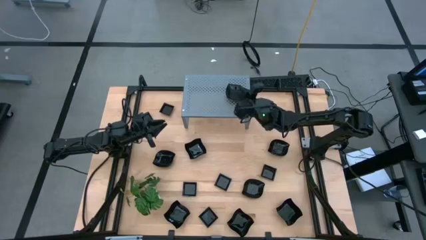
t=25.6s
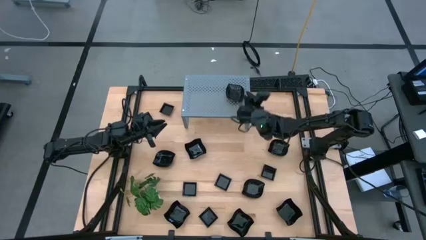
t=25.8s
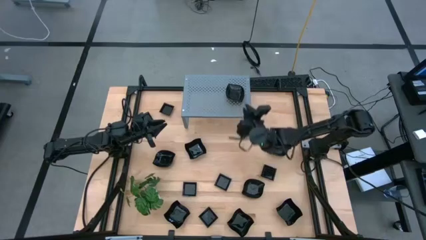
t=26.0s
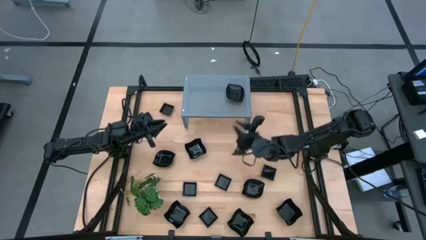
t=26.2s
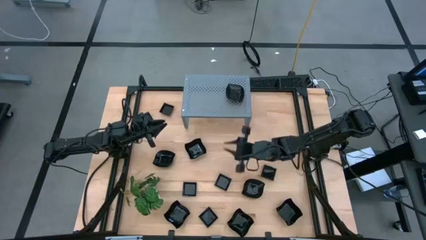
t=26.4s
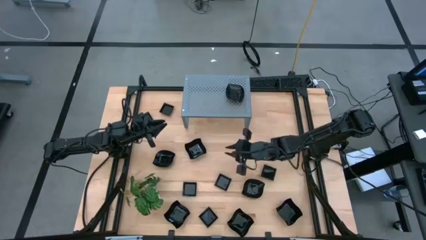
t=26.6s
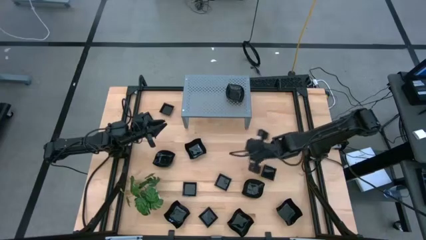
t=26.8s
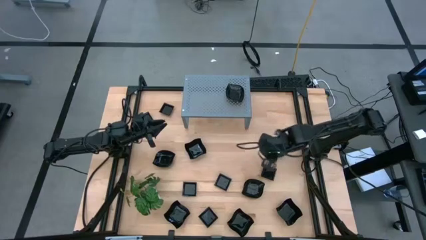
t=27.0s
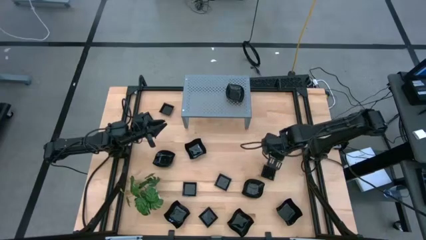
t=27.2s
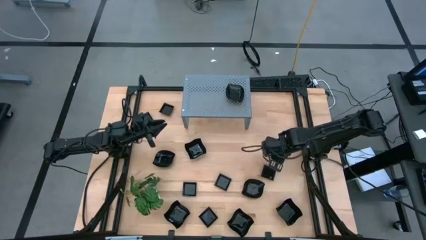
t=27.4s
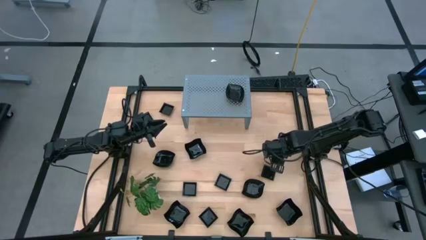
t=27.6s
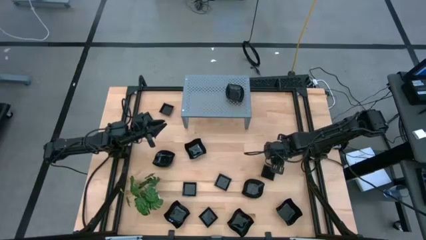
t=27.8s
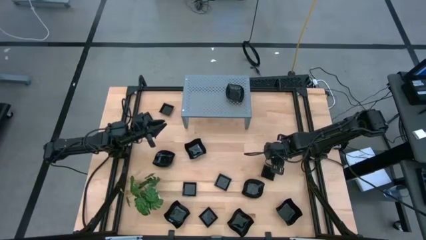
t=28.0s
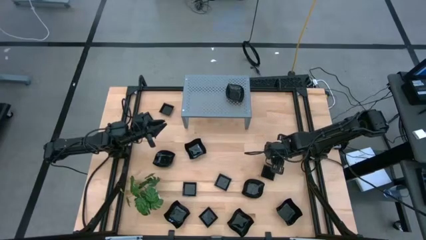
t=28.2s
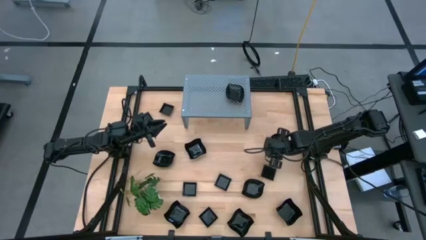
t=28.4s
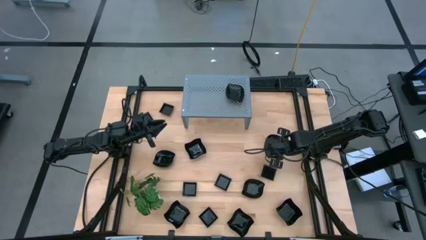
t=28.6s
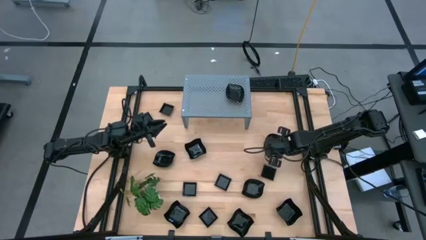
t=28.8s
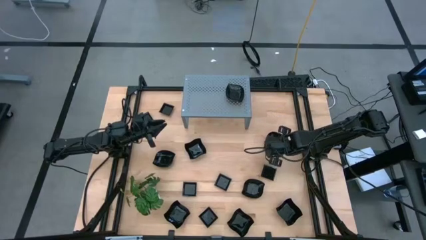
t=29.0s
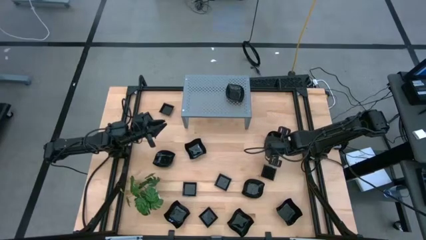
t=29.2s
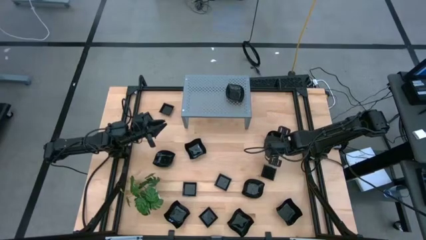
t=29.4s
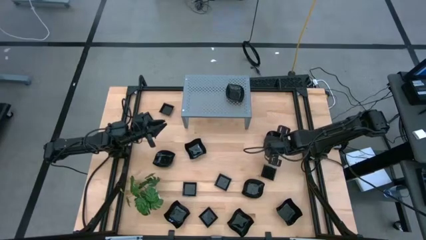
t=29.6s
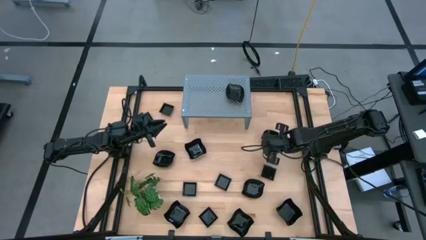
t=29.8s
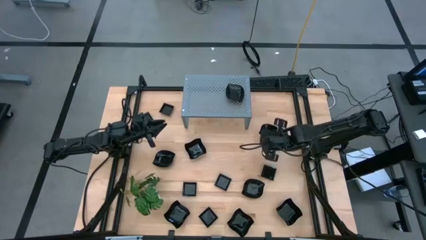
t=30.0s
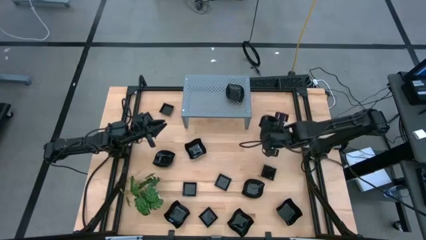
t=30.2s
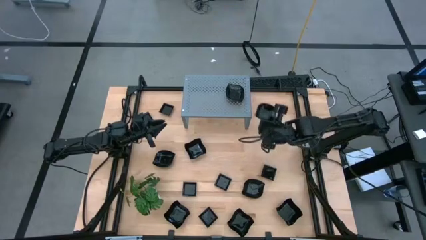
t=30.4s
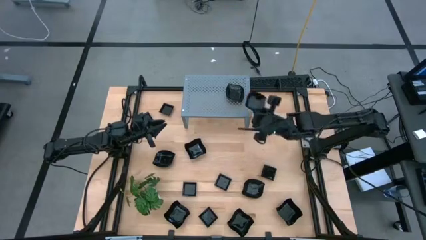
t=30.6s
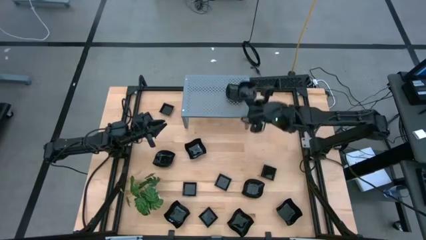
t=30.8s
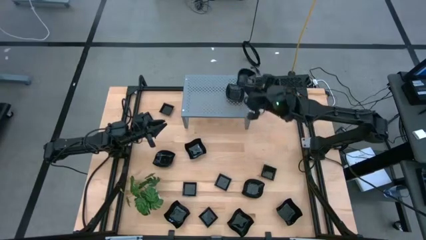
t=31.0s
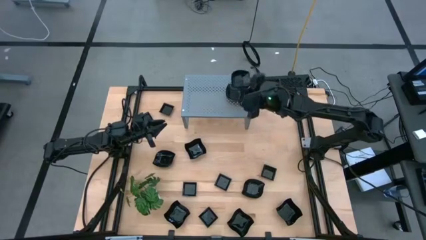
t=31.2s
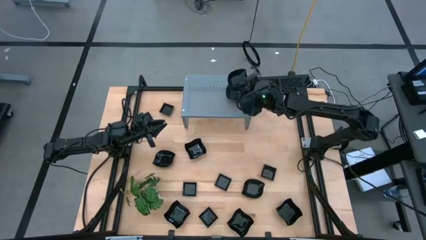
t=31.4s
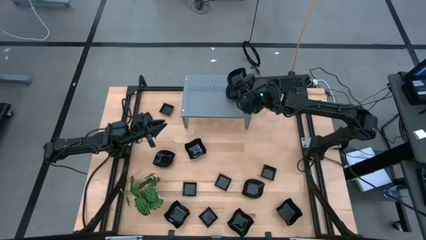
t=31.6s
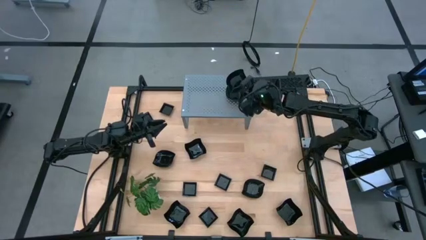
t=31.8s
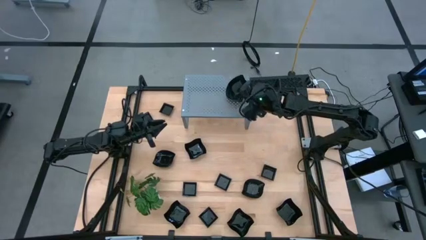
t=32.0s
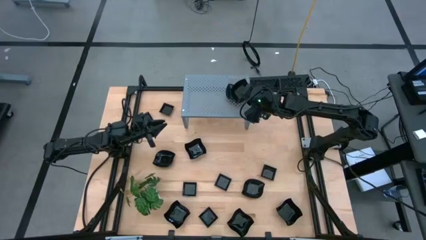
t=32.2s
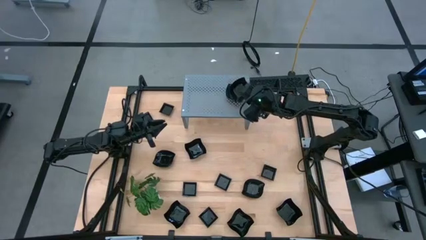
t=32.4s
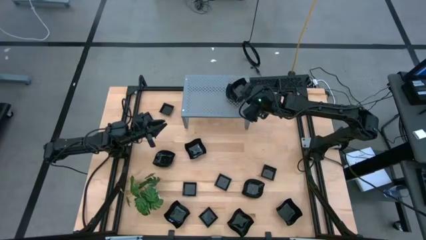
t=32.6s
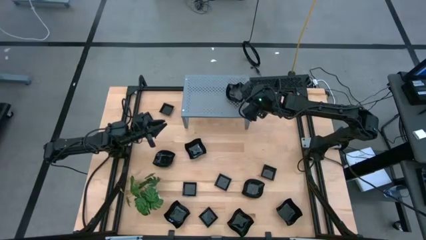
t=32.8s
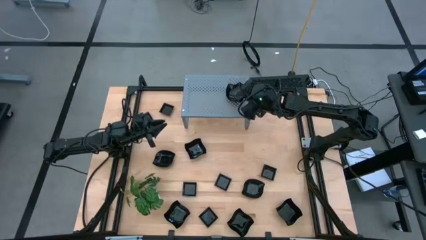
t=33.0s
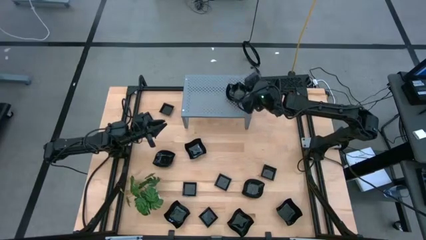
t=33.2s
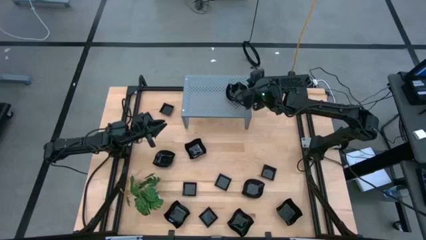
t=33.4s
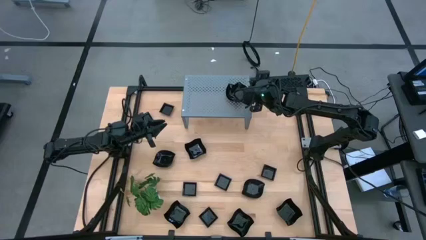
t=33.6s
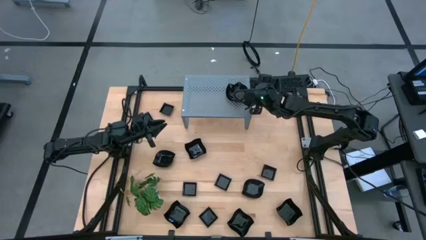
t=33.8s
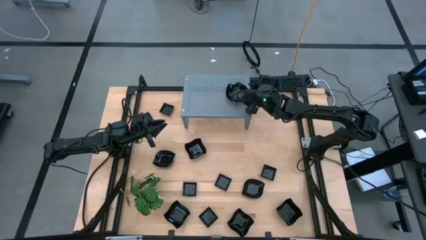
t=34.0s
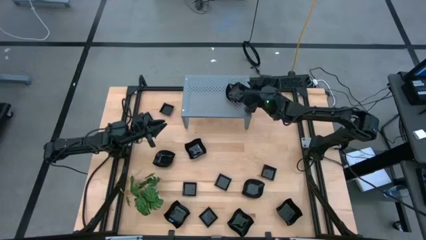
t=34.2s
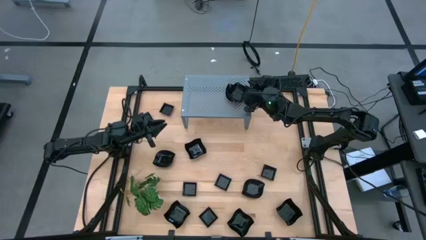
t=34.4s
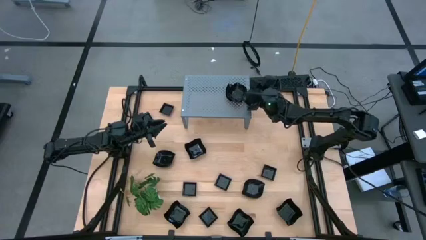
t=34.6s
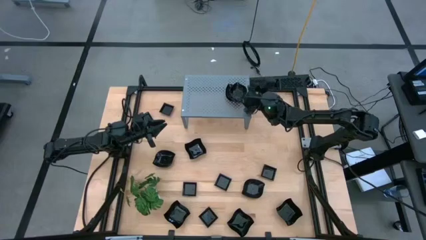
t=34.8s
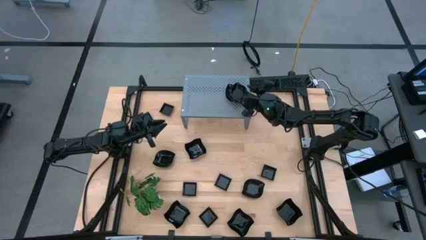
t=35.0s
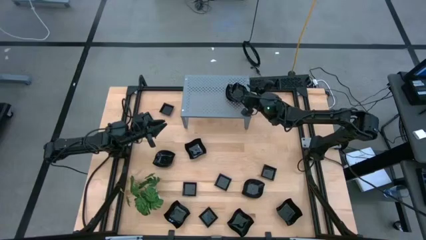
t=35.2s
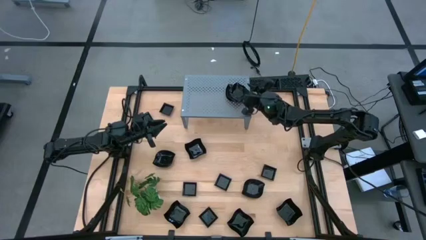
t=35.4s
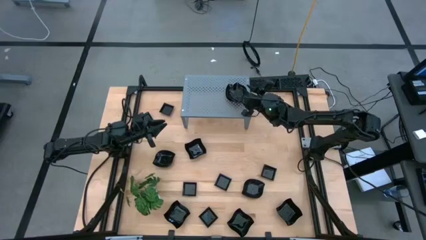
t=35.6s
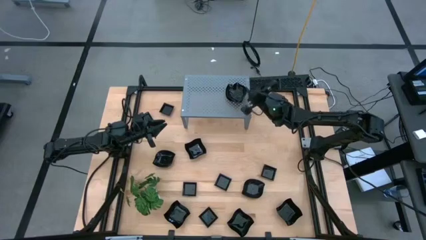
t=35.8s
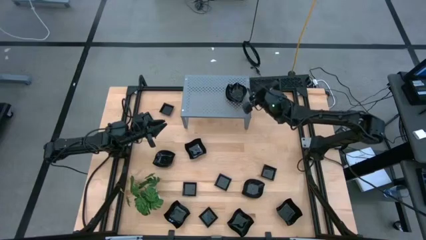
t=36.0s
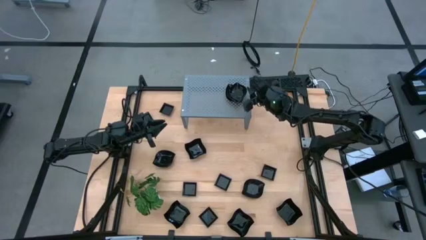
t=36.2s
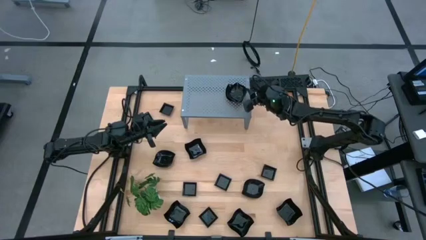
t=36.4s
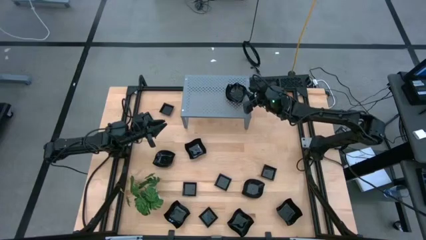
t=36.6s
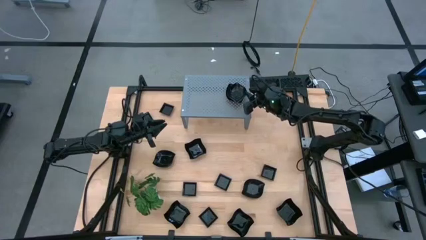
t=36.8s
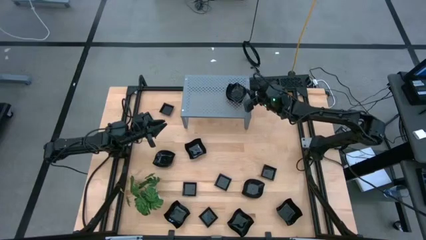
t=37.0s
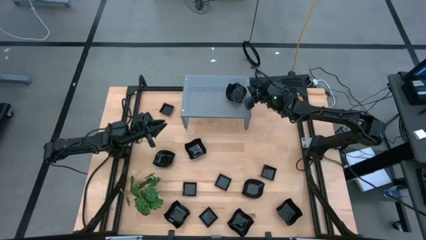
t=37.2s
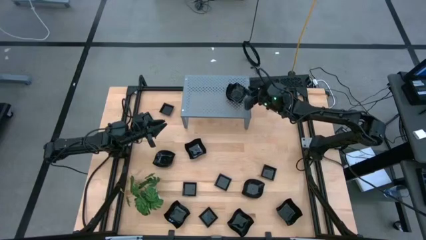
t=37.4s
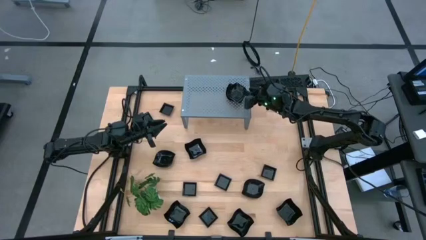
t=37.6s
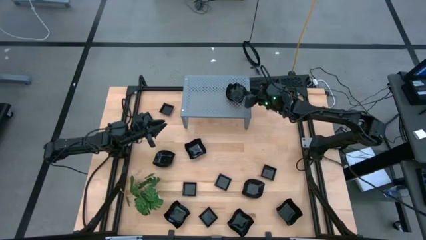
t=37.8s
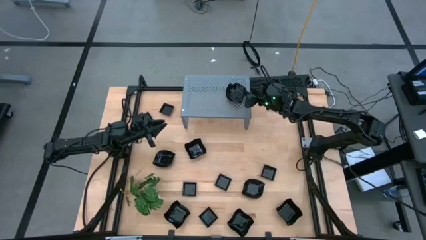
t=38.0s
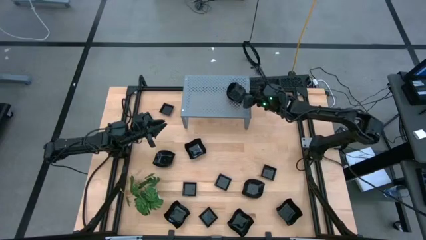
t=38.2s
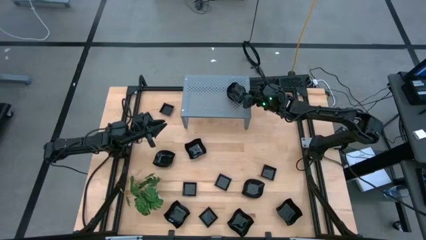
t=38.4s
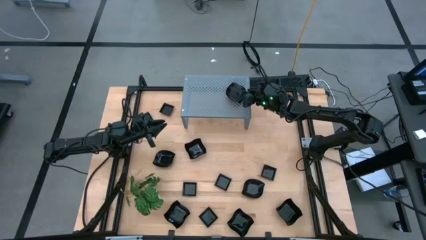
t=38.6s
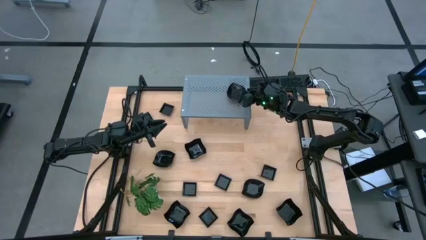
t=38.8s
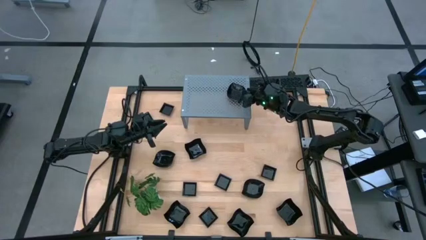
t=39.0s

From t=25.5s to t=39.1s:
Task: Pick & Place Mini shaped plates
Stack the black leaf shaped plate on top of the black leaf shaped plates on the shelf

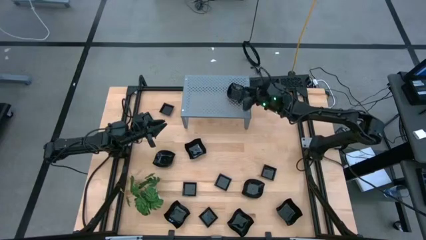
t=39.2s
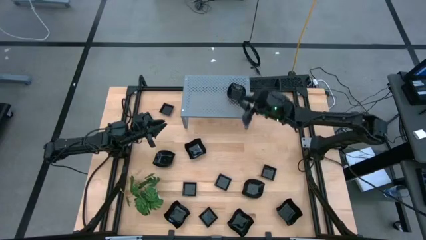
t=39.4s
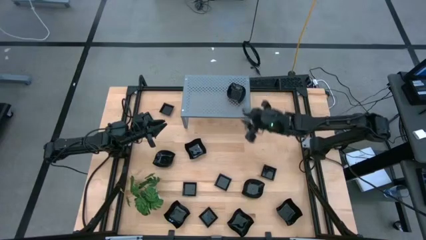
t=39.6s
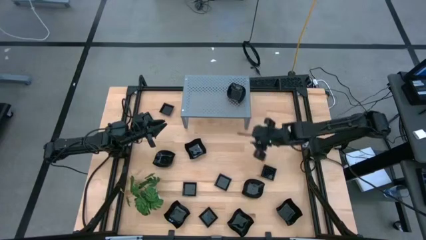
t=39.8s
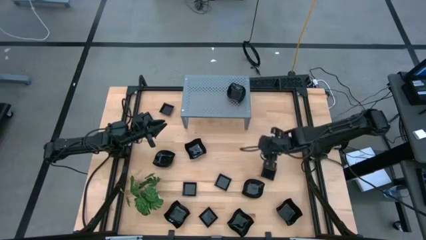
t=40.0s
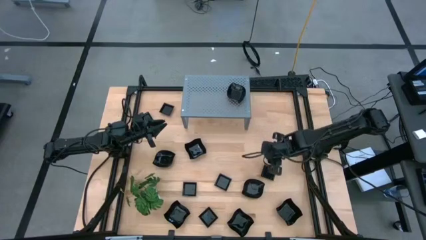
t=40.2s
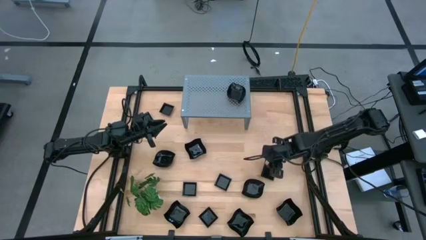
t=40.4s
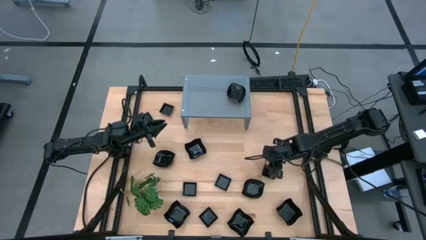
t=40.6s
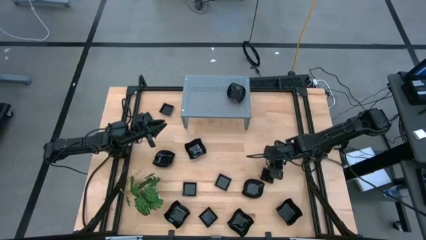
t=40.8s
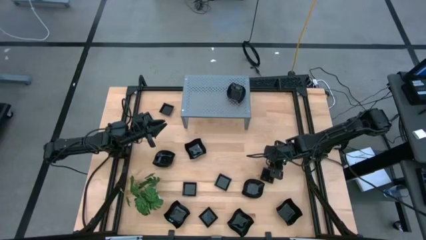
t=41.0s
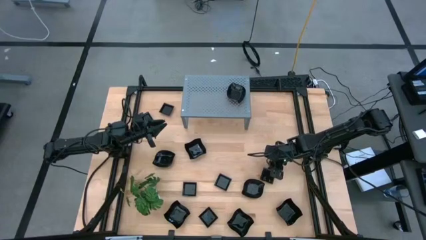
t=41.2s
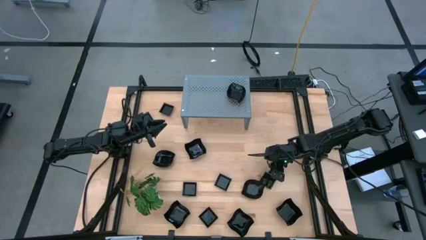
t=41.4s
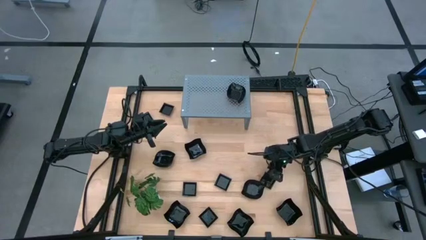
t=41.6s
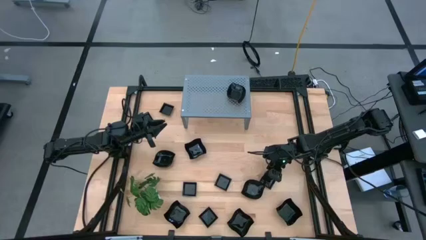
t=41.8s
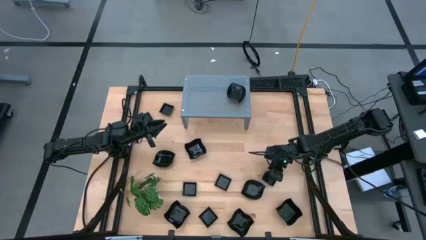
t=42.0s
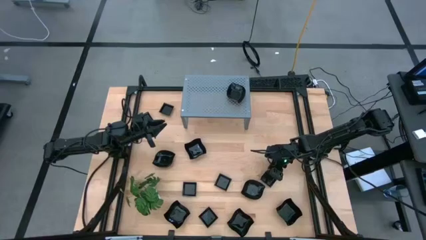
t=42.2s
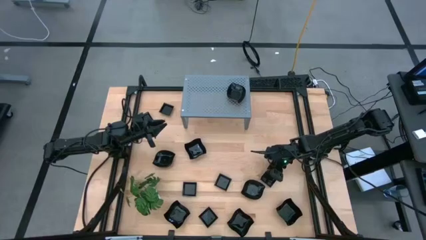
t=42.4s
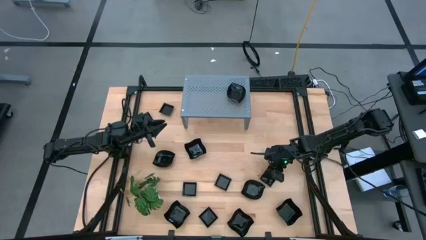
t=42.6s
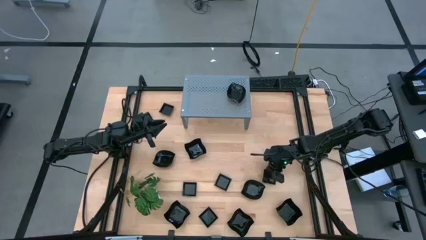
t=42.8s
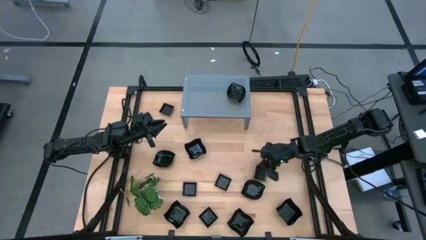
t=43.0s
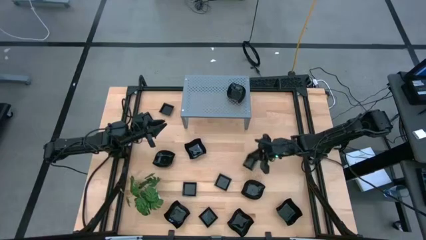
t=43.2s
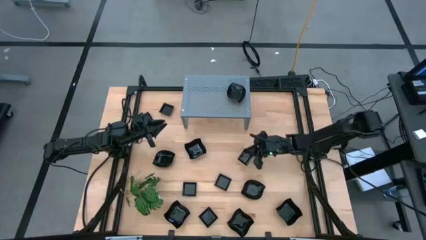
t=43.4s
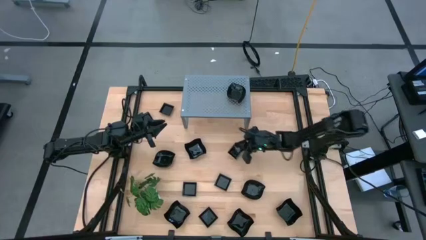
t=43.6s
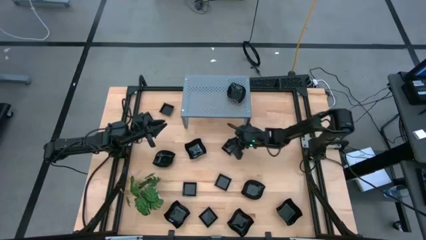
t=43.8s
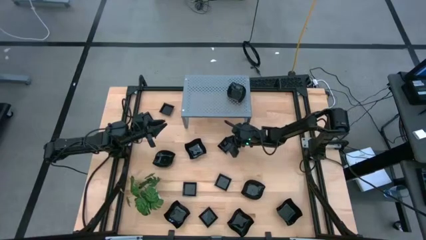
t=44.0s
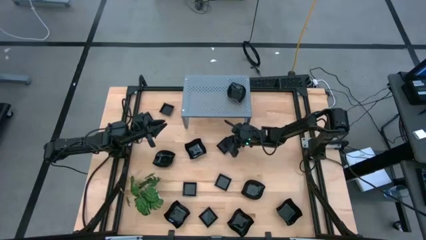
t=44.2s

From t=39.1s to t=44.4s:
Move the black square plate to the center of the table
